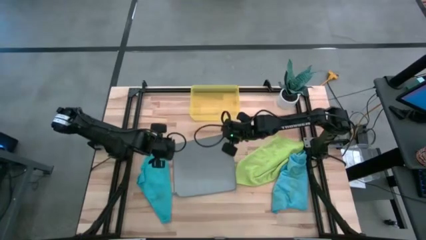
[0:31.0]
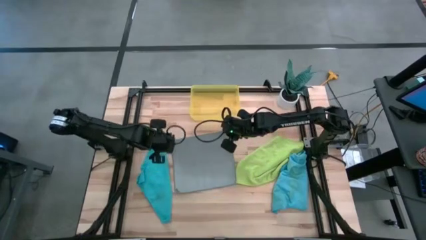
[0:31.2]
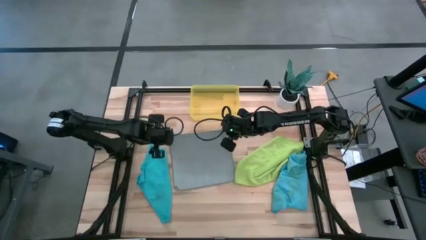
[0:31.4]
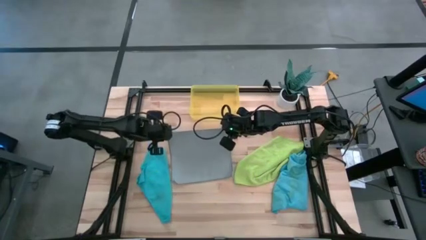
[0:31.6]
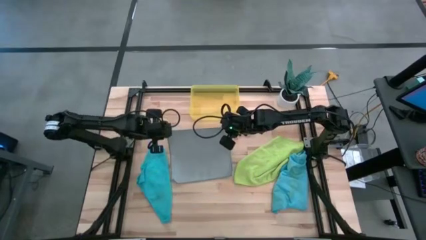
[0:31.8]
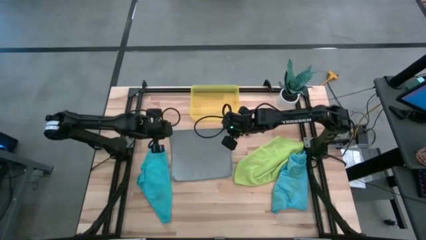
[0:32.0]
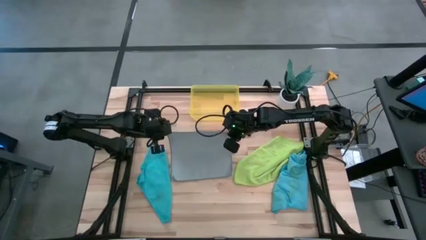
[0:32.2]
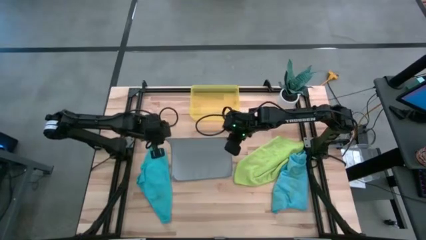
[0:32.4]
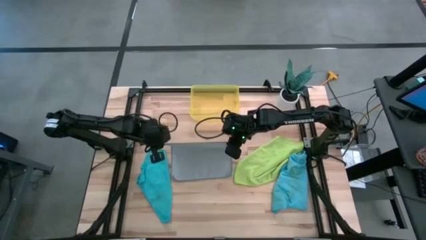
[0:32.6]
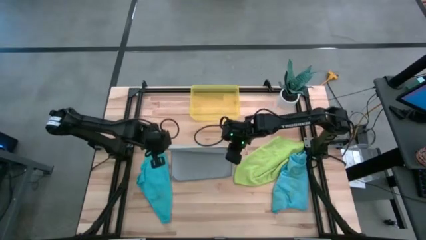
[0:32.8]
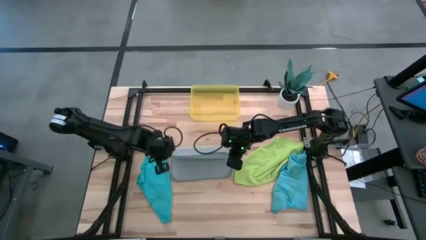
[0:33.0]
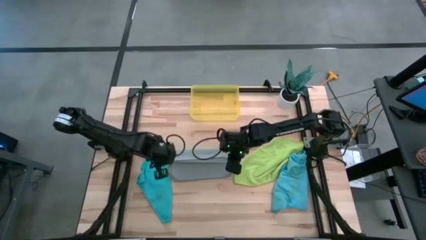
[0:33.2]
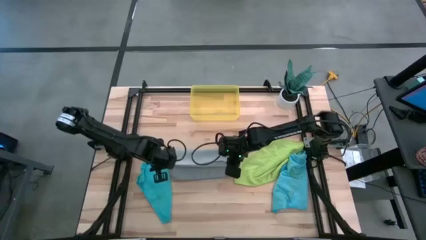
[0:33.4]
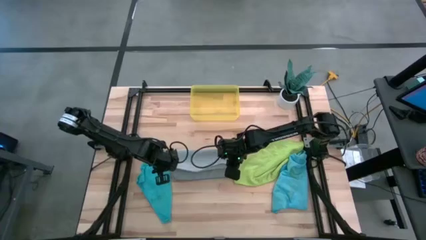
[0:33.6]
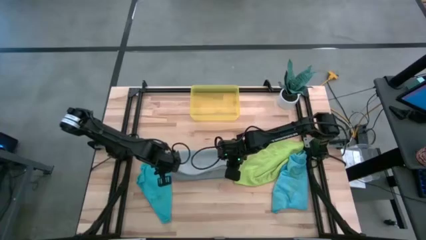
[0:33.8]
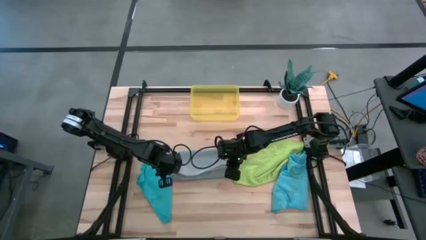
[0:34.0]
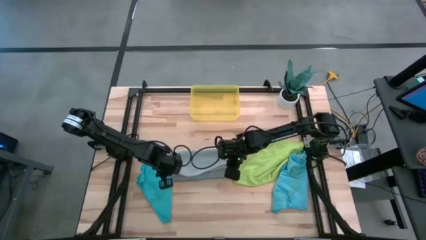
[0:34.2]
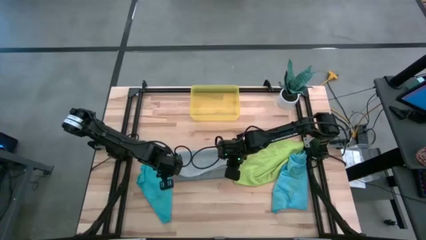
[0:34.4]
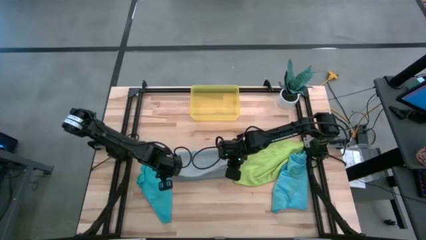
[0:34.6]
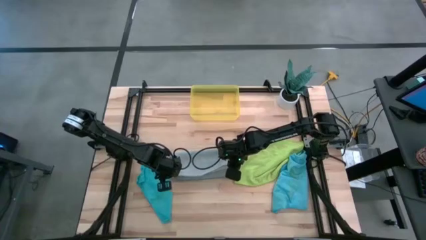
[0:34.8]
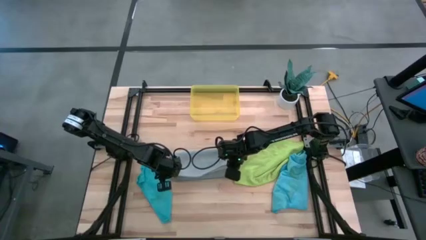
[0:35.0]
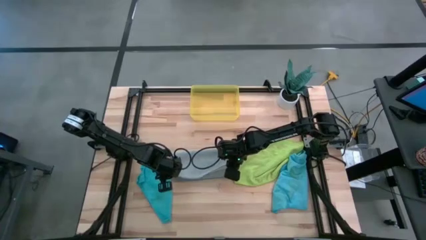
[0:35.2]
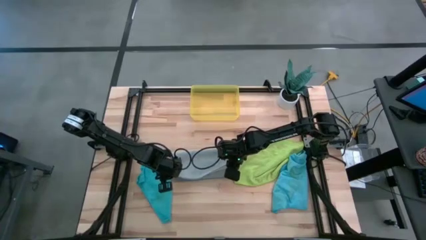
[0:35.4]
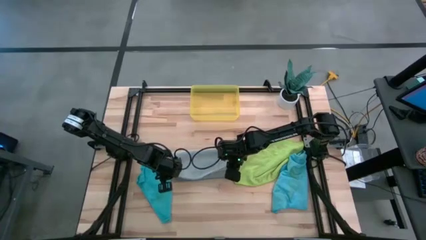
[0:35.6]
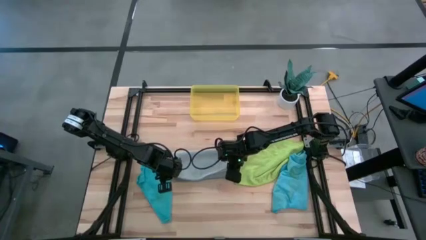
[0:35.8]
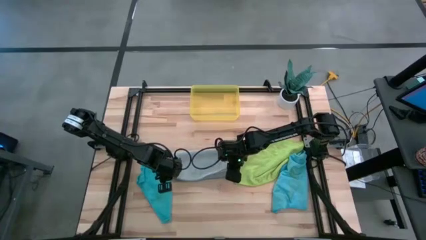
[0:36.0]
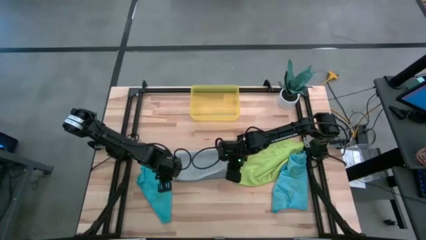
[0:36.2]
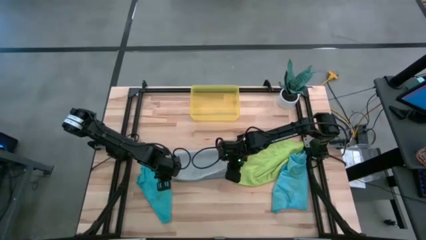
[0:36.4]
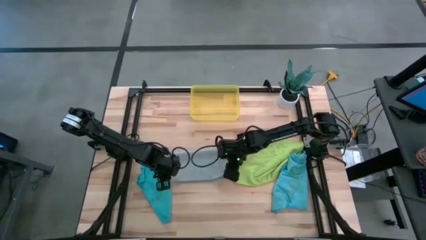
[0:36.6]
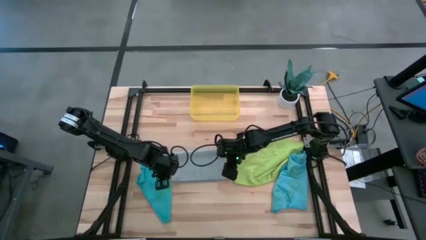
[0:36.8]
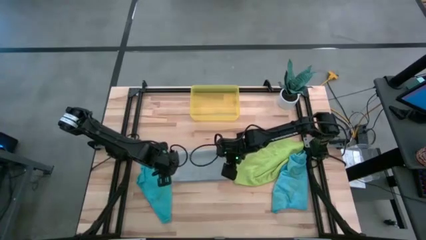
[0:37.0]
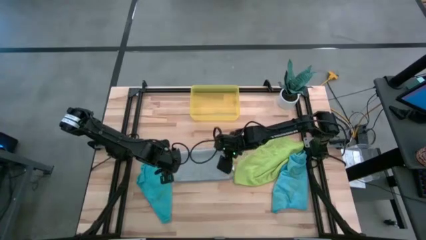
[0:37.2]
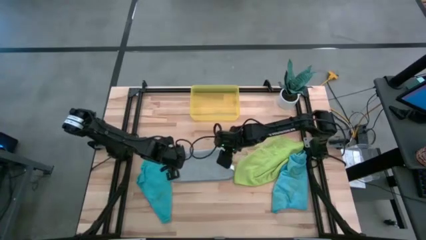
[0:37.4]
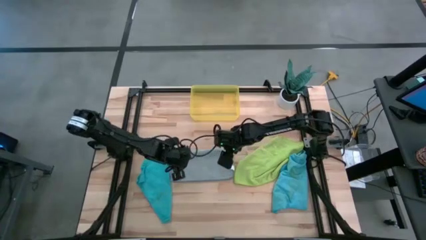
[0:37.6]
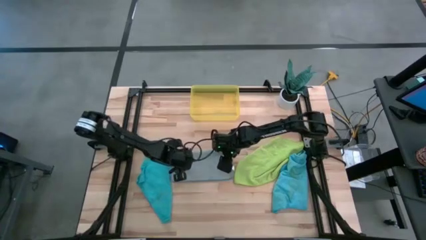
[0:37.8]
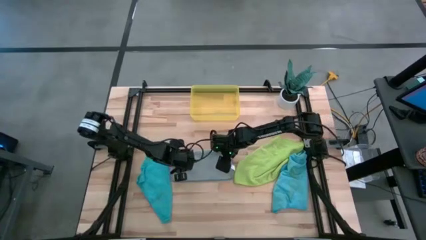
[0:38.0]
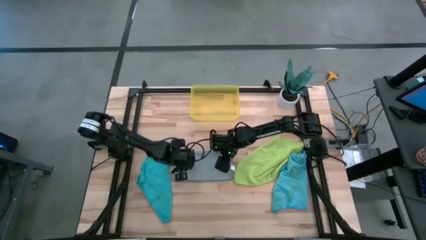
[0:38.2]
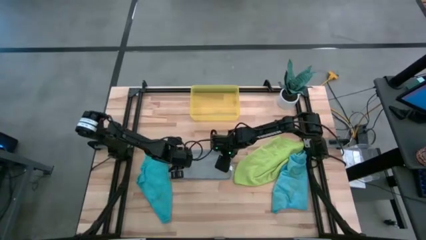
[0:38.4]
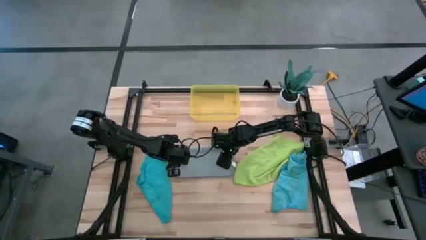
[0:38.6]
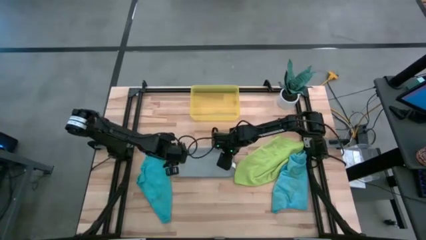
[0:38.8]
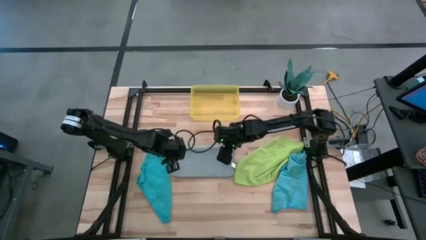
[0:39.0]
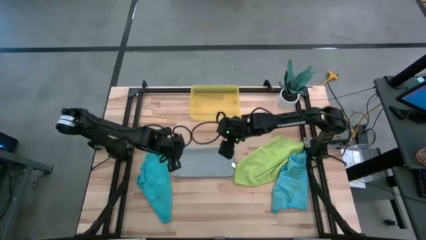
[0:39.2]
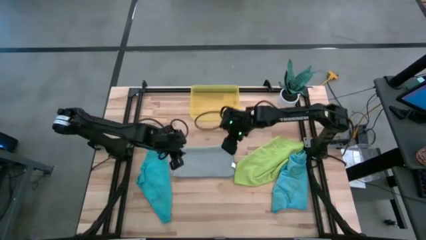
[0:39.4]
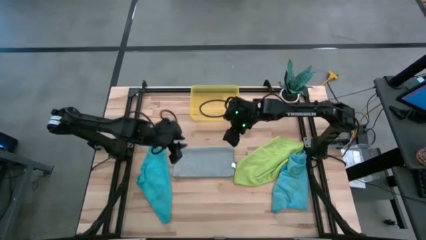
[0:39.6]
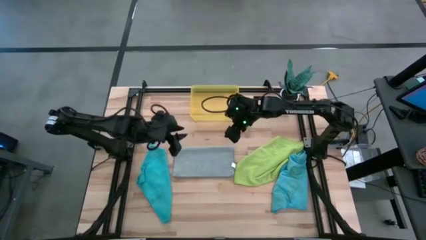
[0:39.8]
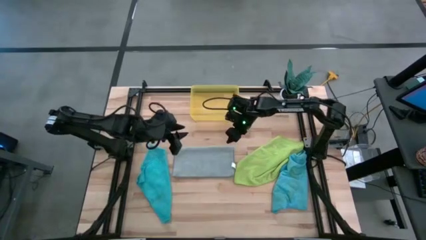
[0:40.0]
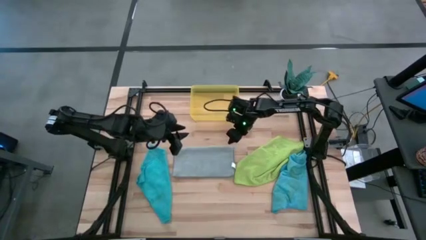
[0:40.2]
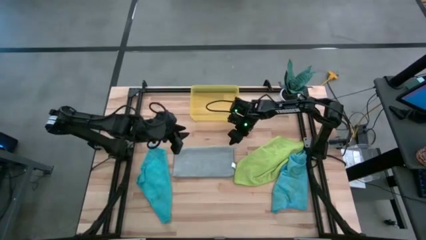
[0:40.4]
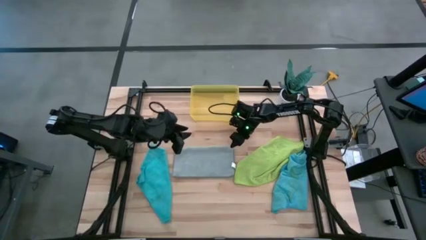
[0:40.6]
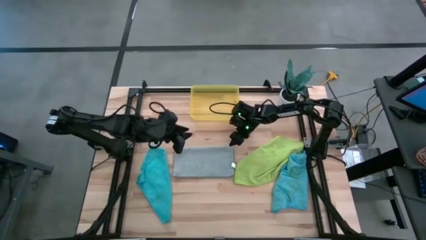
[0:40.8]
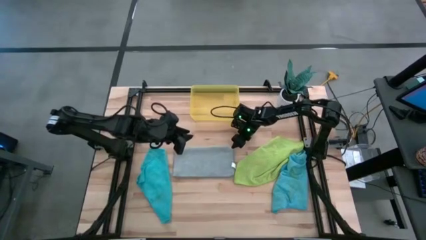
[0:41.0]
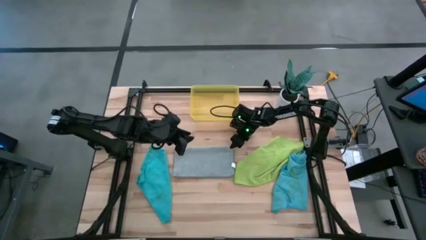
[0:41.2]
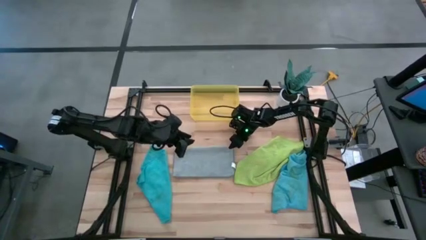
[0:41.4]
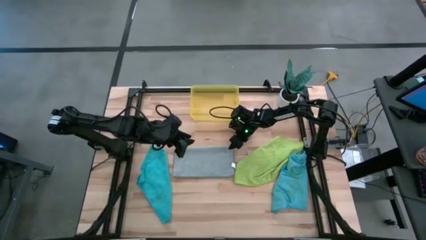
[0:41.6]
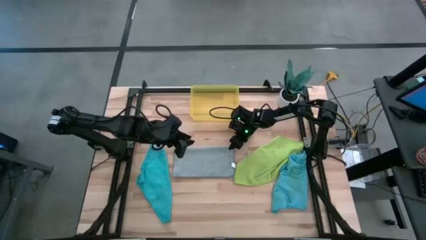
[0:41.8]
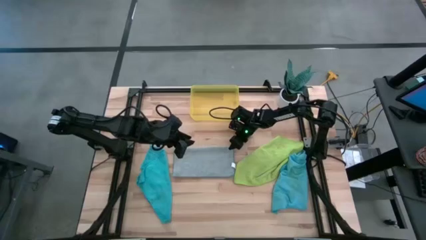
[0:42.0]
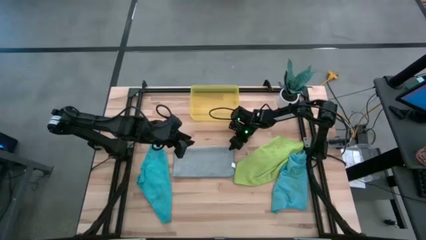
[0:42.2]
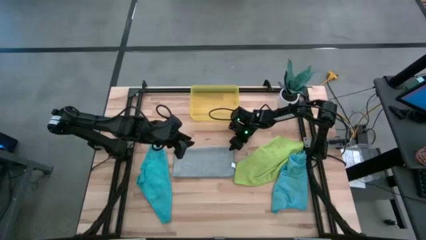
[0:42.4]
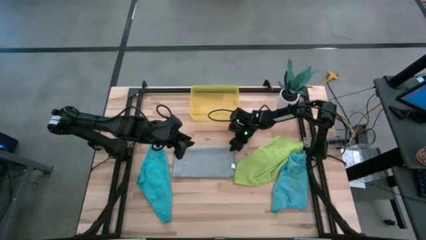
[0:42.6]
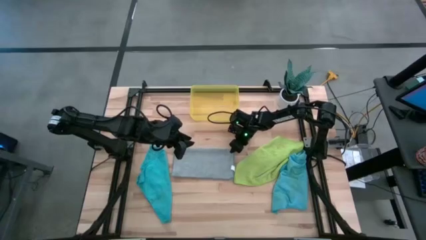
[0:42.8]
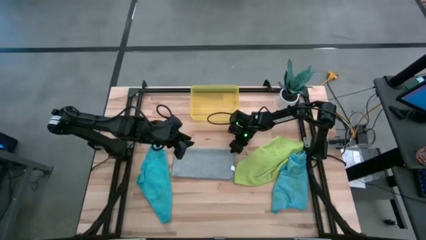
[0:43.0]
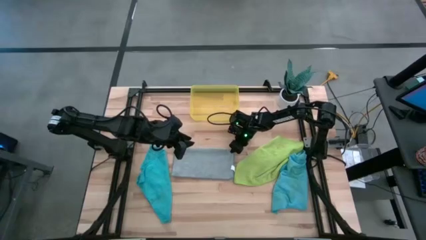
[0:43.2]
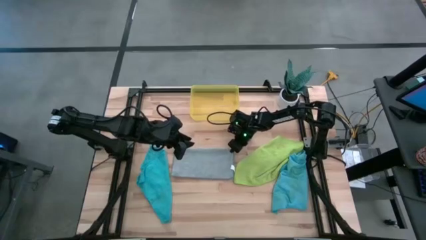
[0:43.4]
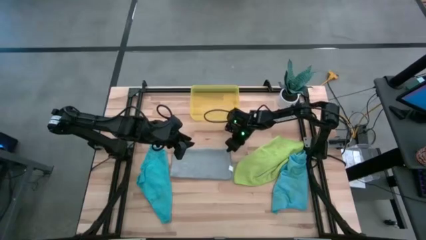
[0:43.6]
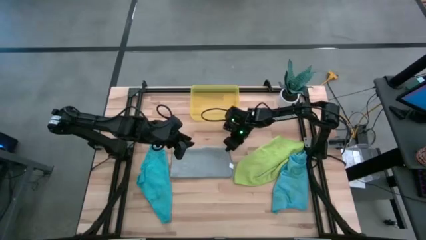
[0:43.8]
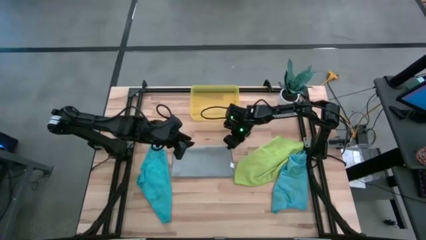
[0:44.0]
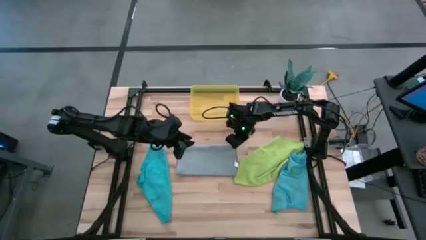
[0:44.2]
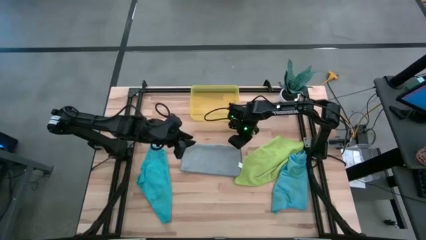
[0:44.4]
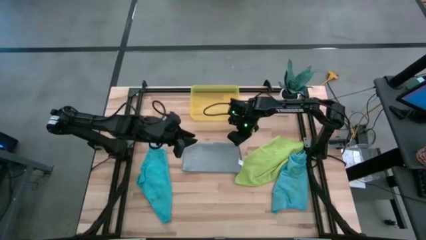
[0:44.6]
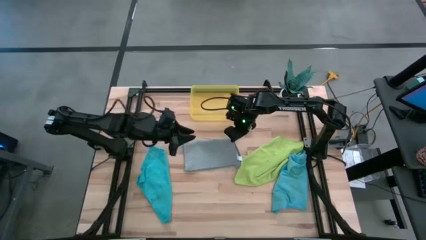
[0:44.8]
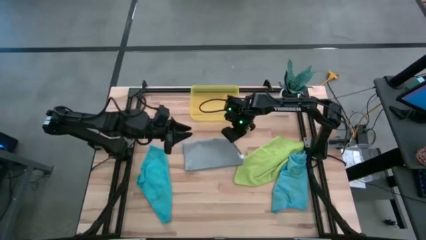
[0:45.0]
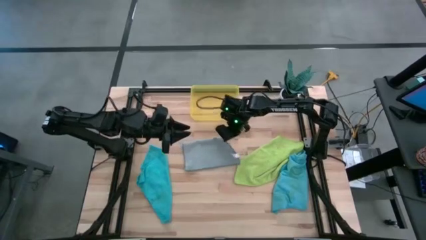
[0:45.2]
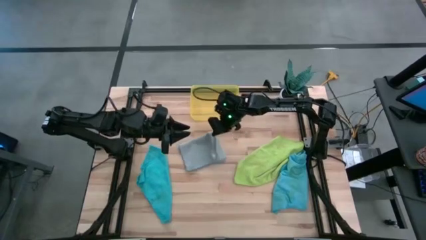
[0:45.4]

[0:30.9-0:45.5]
Task: Fold microfiber towels
Fold the gray microfiber cloth

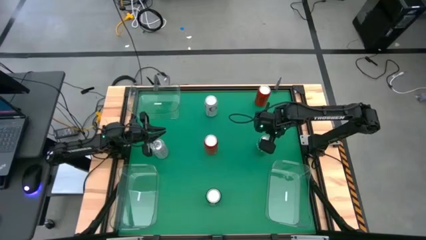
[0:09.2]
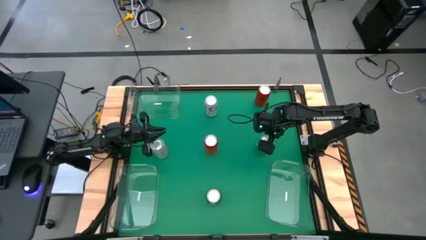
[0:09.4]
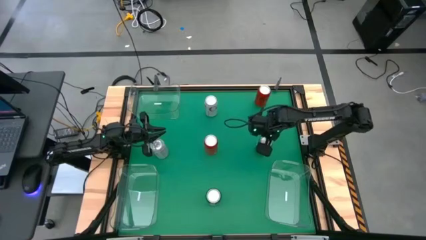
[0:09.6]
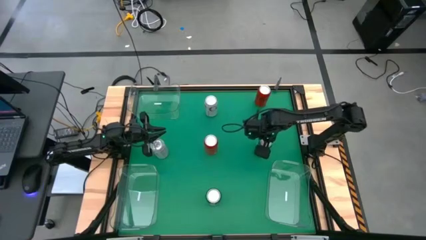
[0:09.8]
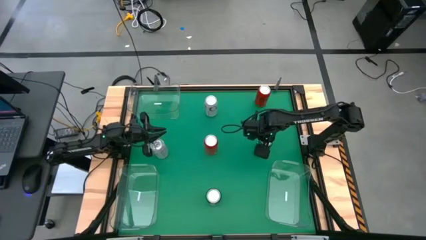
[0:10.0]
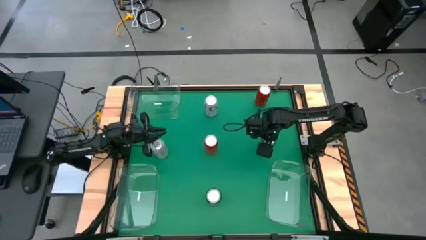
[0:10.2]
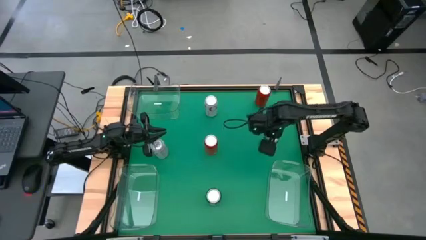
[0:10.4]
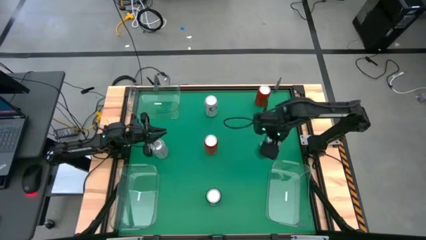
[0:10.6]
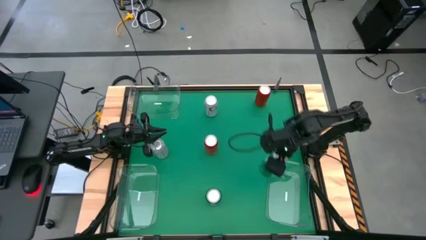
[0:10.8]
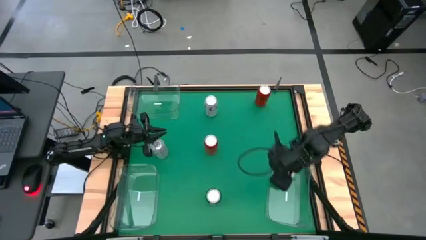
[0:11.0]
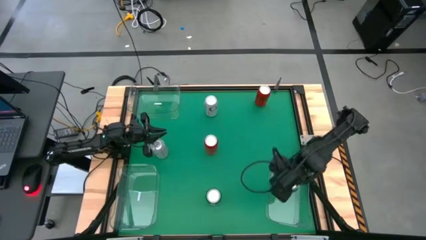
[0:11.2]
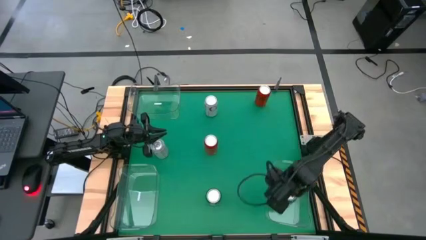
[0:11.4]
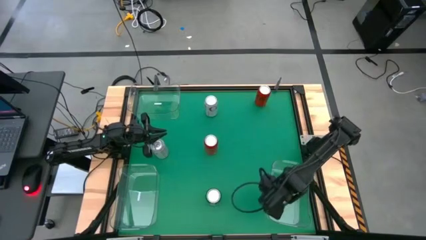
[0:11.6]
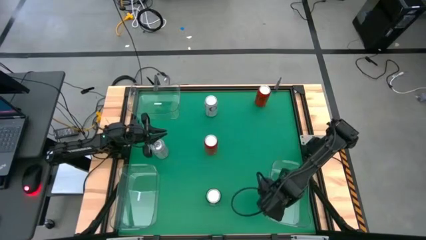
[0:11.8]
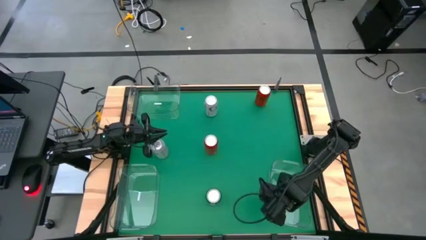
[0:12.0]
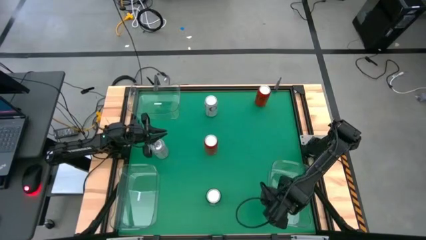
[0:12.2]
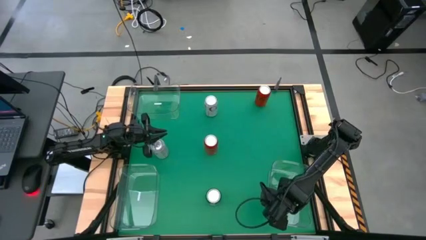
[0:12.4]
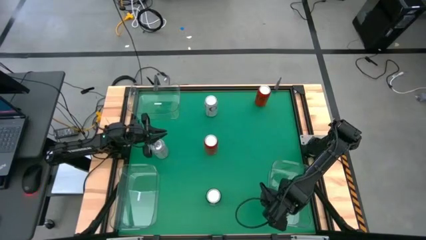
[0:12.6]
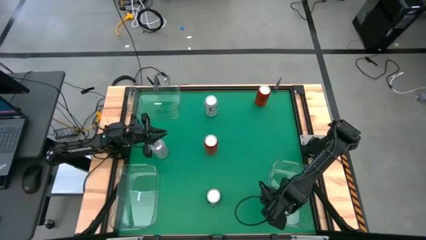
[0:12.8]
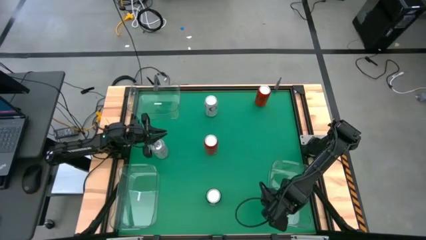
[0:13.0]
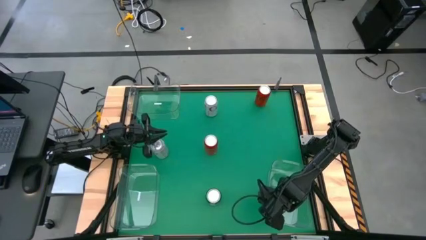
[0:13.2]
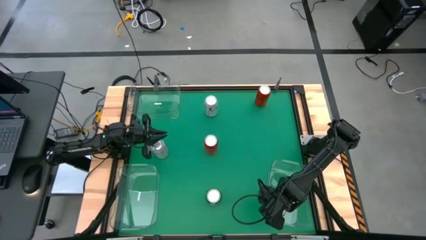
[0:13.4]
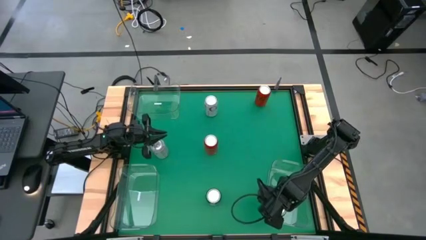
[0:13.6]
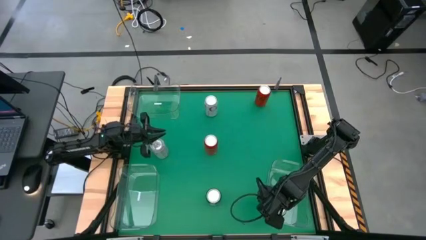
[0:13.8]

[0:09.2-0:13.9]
Task: Sort soda cans
Put the right green soda can into the bottom right transparent bin
